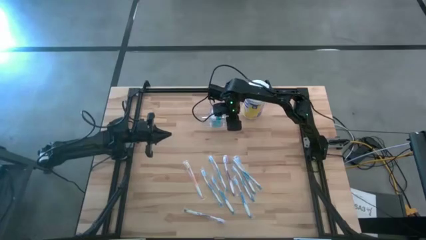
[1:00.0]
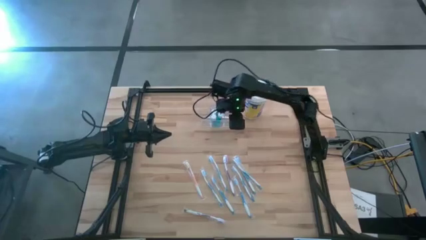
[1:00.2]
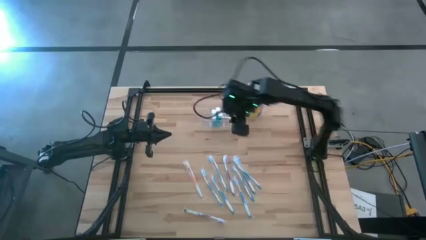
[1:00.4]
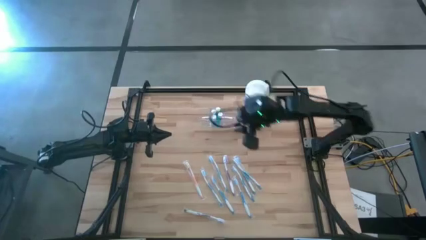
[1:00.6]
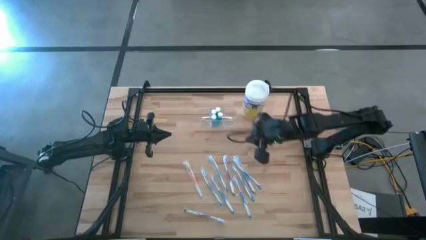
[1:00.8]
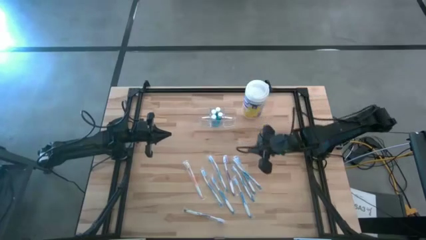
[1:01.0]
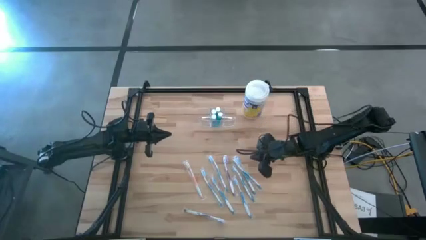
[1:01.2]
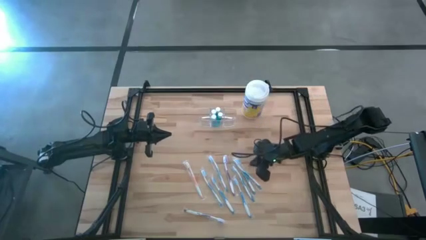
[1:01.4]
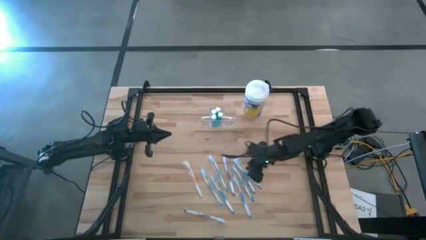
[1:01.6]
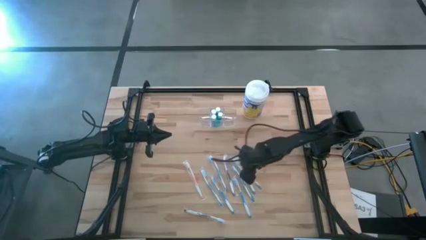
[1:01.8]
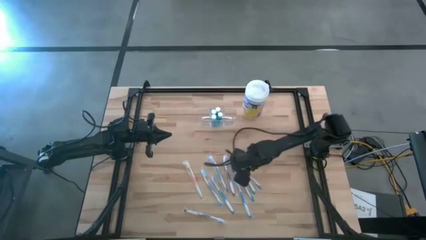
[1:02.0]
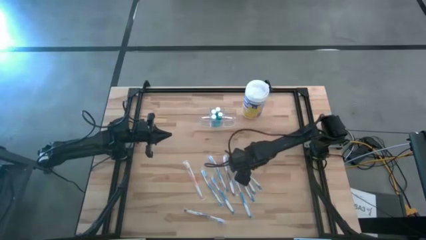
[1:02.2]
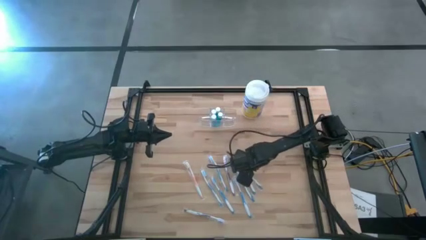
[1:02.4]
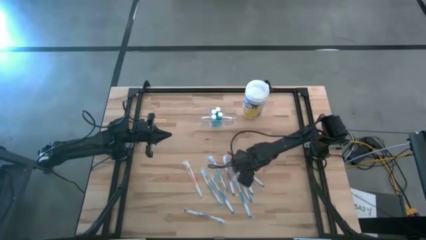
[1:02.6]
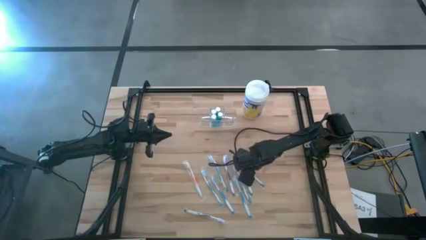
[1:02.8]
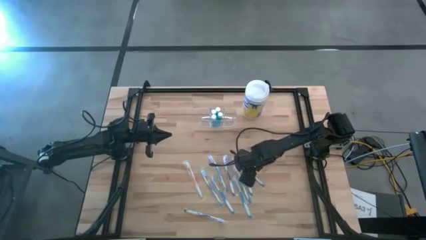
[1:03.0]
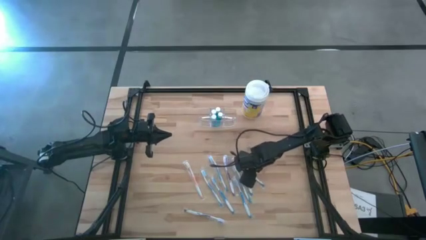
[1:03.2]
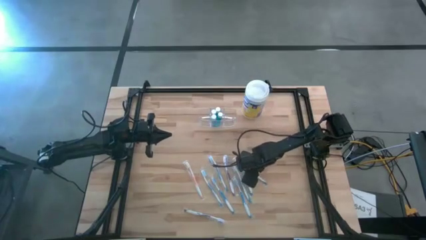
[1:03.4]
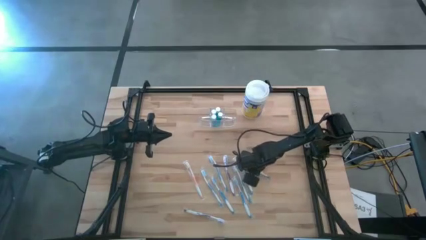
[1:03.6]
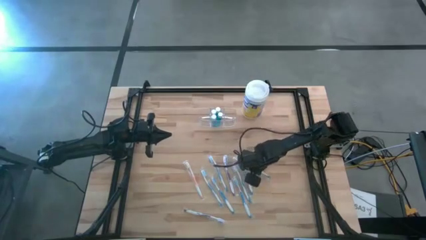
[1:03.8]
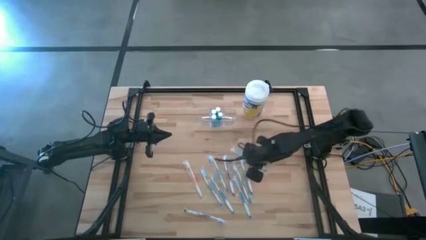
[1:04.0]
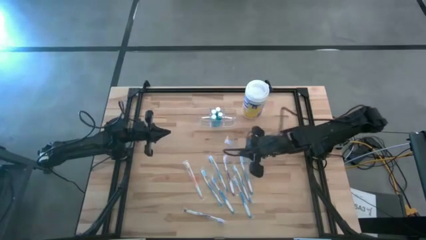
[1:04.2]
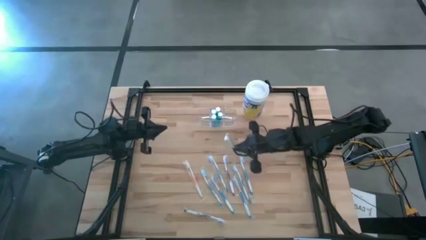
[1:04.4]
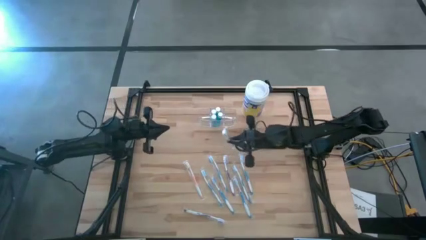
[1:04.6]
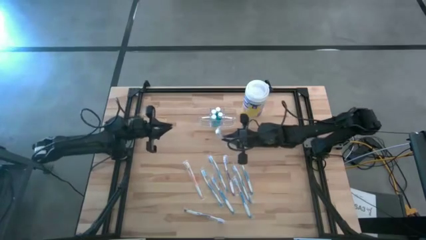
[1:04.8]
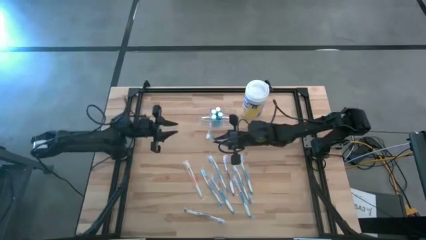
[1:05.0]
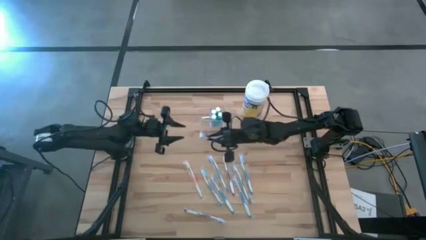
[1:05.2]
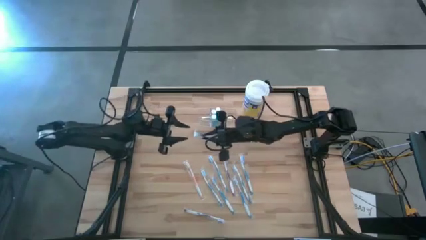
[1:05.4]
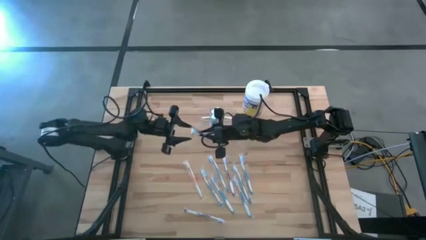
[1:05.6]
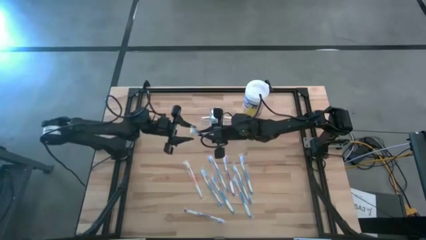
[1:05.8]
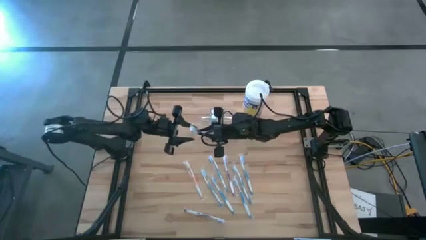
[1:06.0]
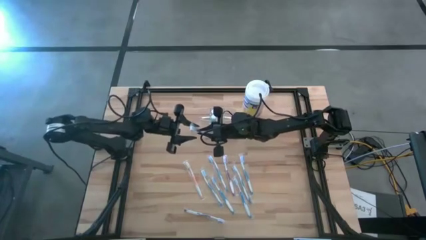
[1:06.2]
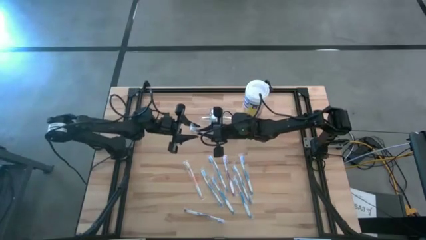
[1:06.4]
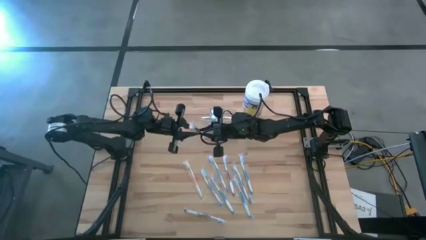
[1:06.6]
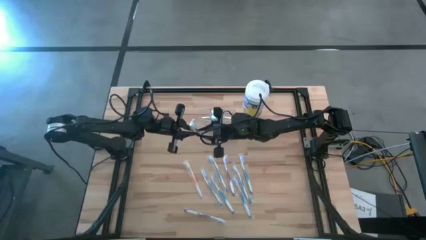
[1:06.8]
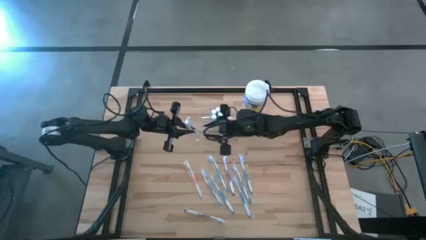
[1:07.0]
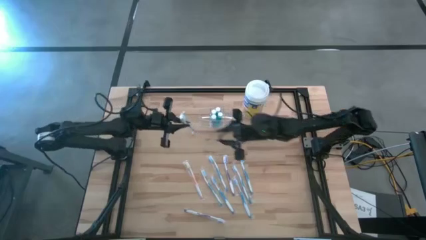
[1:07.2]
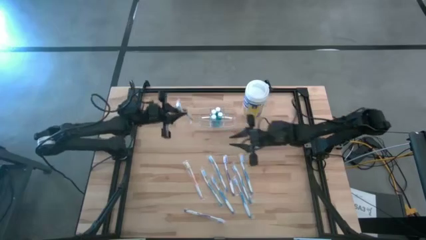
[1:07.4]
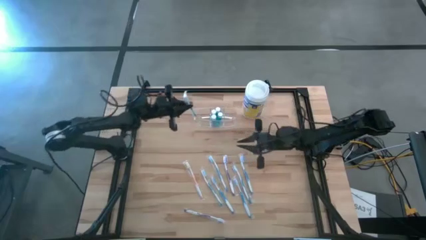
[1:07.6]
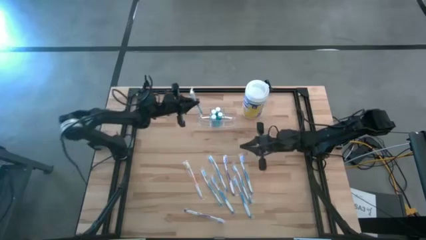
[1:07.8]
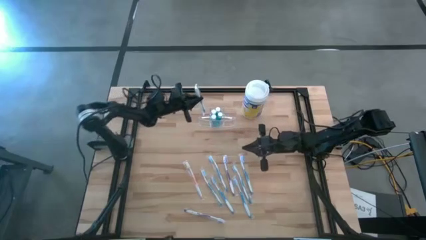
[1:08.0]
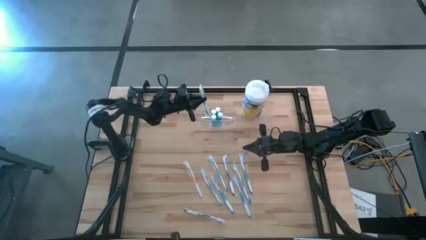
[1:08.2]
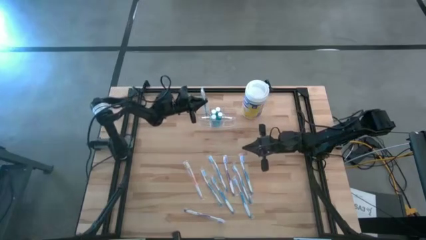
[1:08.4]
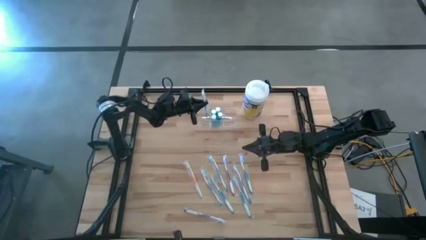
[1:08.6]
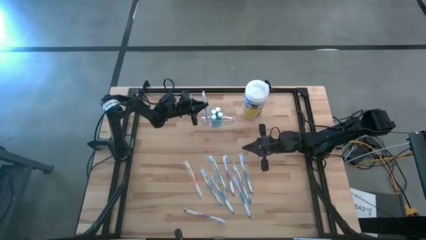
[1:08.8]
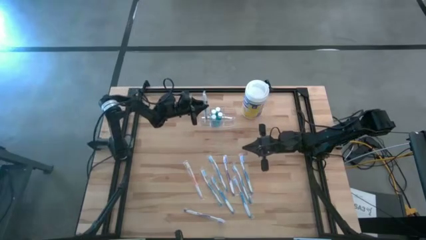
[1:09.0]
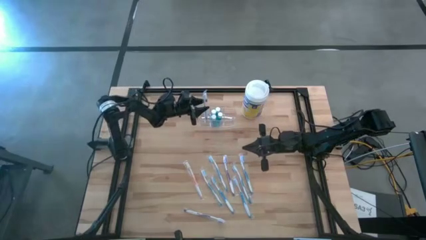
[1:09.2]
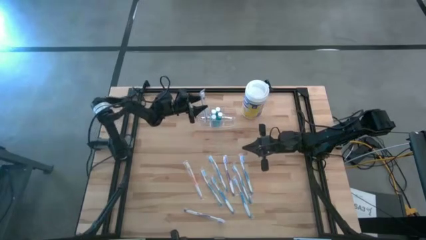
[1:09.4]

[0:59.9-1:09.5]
Task: Pick & Place toothbrushing station
Put the blue toothbrush into the transparent toothbrush holder

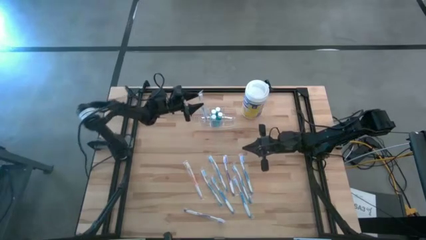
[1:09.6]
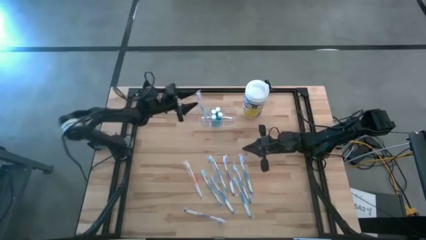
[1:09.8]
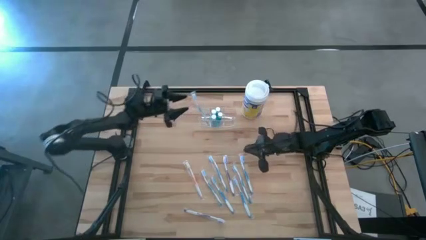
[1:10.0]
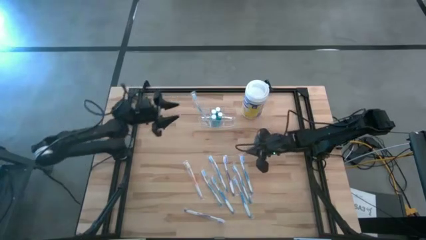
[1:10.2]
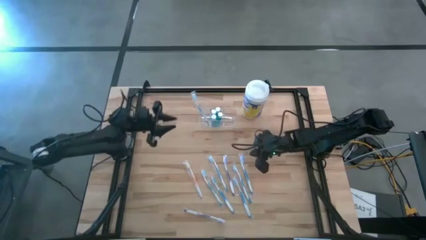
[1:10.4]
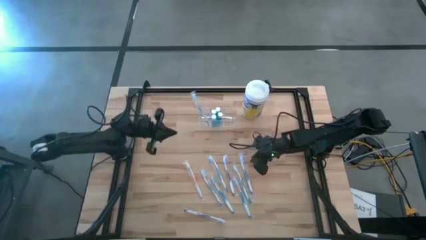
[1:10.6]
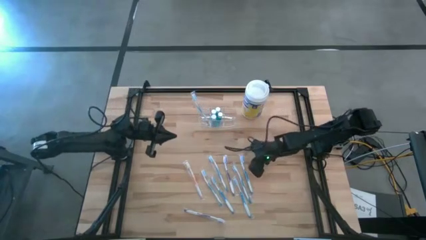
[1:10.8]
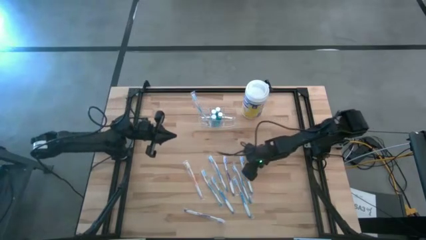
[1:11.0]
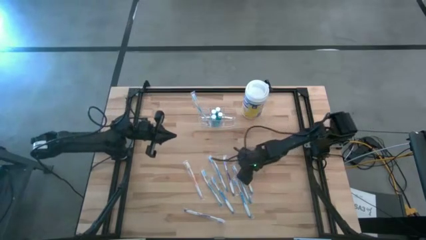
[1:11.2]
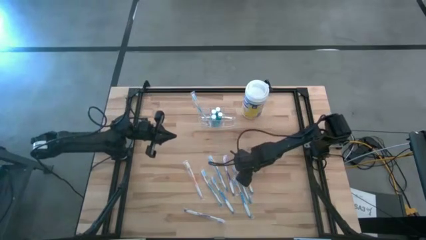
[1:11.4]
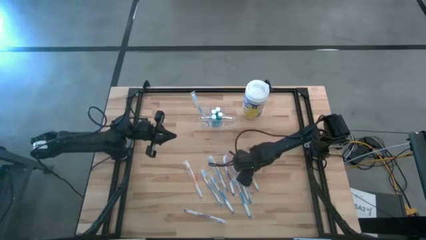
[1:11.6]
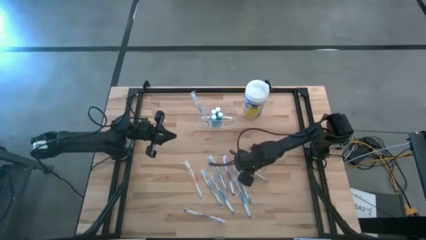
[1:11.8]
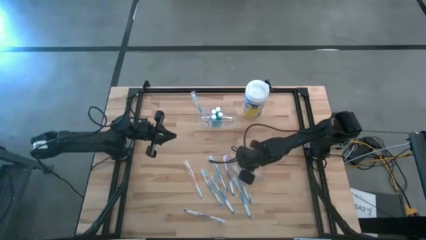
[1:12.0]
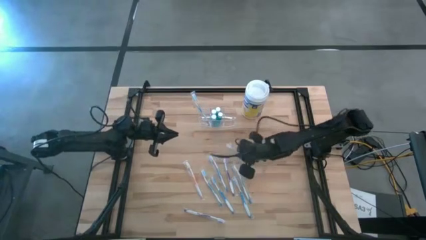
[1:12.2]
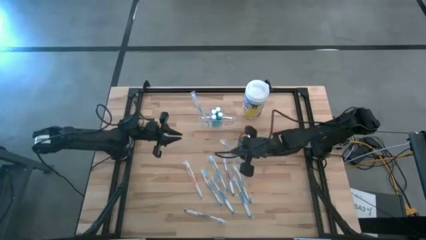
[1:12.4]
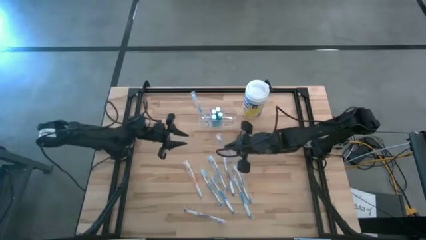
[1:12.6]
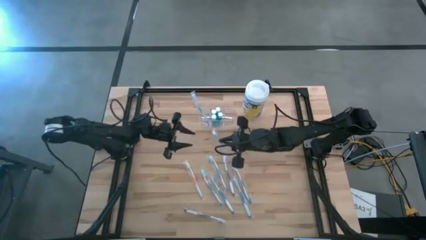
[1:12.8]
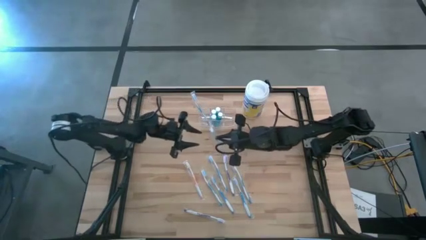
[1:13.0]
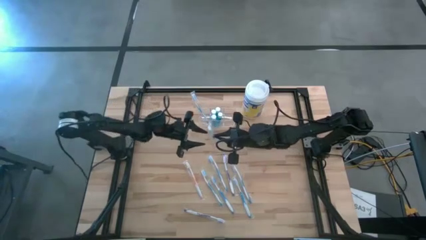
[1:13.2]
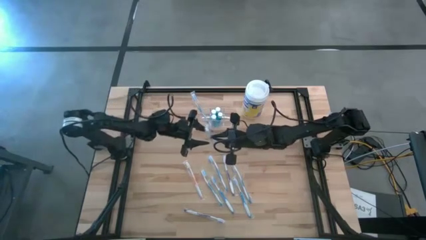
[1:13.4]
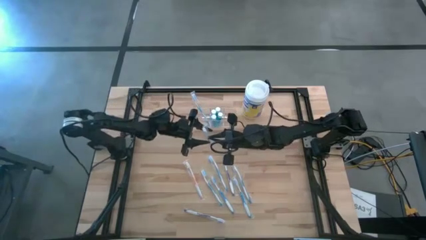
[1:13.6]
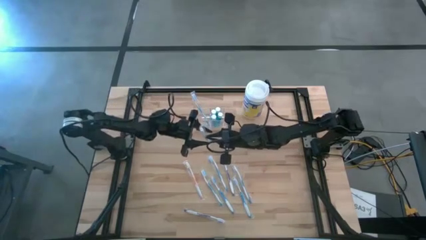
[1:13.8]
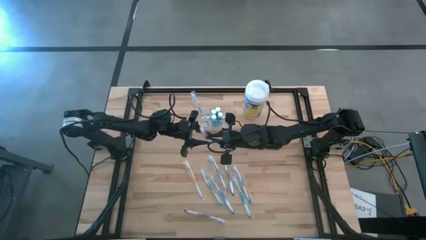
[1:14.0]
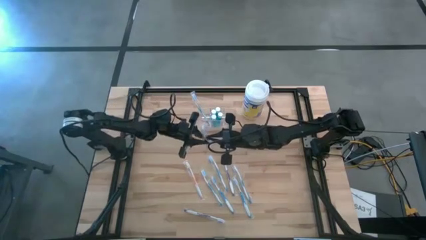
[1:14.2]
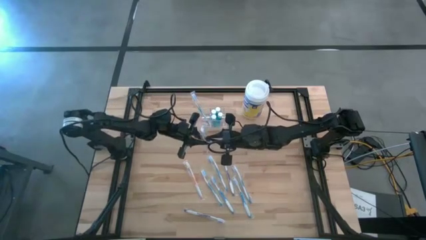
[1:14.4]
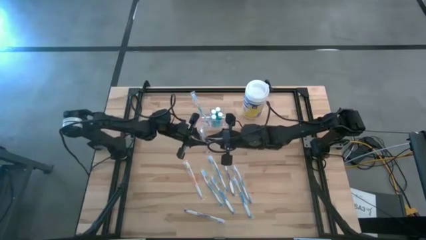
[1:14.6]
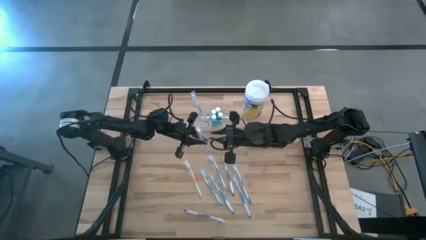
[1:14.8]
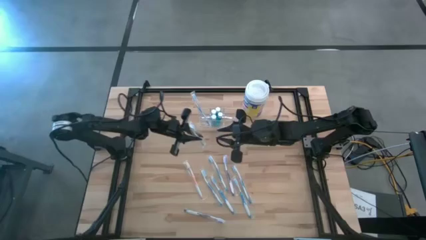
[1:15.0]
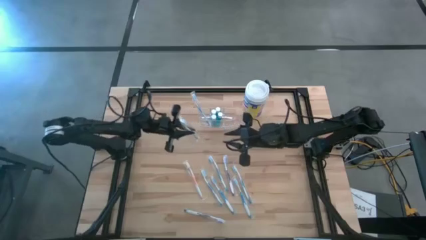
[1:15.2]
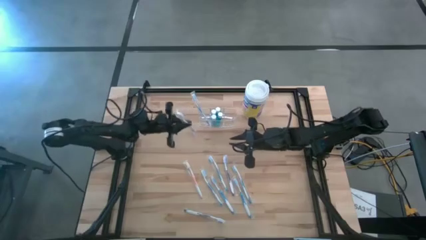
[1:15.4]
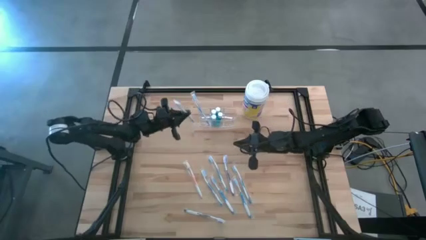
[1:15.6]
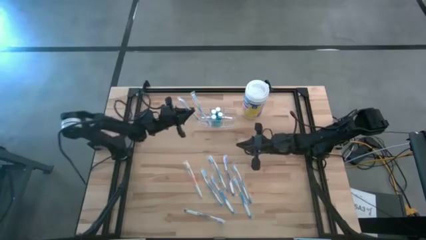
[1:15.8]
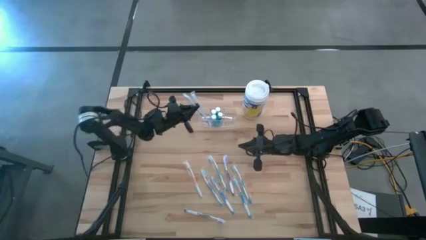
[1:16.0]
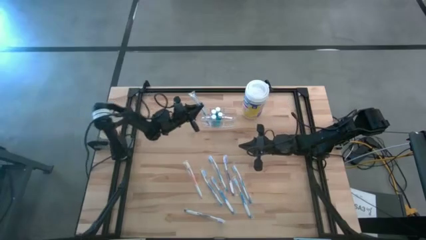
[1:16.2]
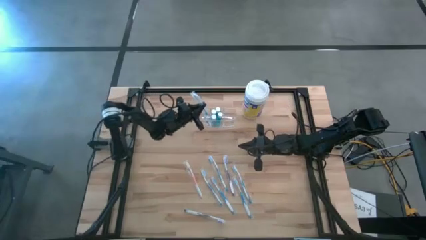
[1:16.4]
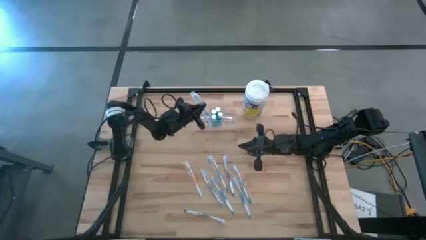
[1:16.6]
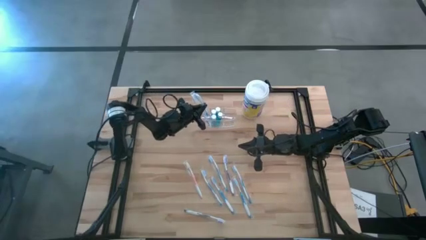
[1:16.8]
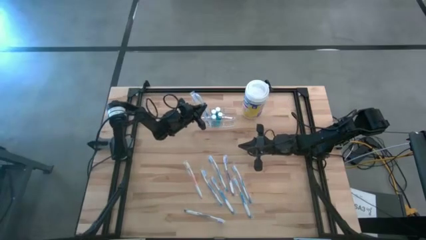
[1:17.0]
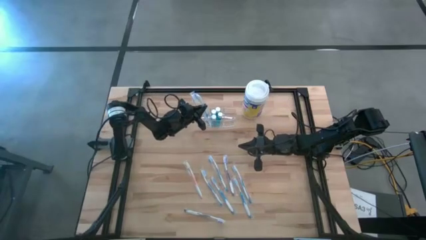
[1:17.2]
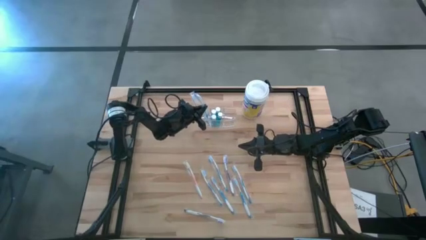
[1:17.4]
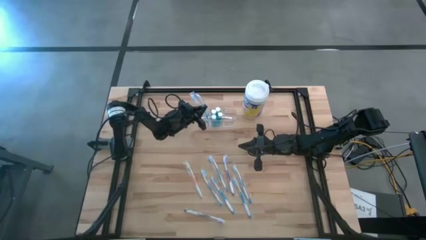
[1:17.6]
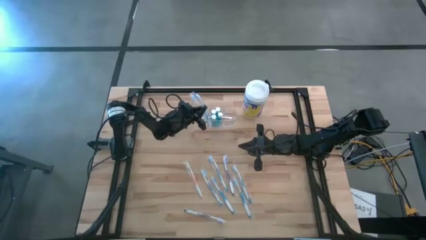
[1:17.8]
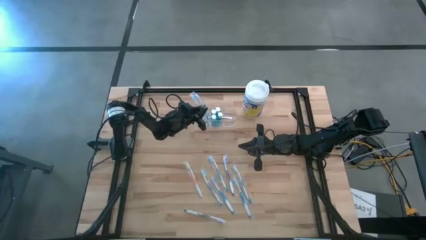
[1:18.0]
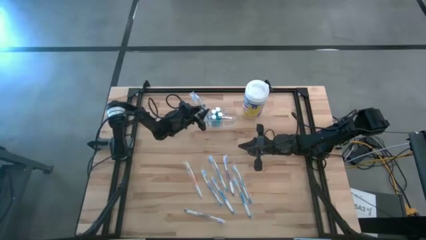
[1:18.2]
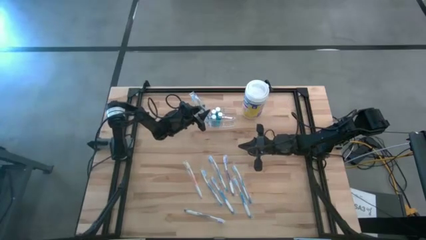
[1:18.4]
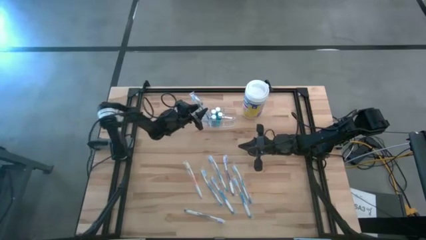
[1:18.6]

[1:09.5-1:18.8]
Put the blue toothbrush into the transparent toothbrush holder
